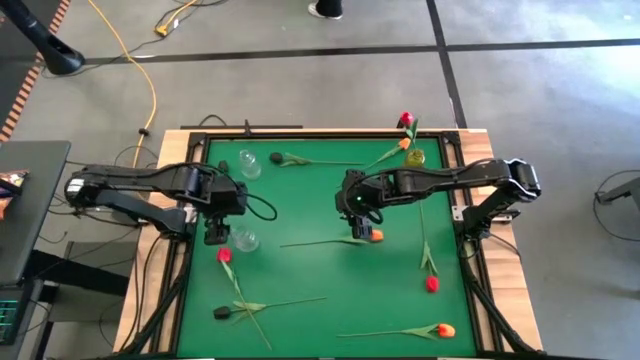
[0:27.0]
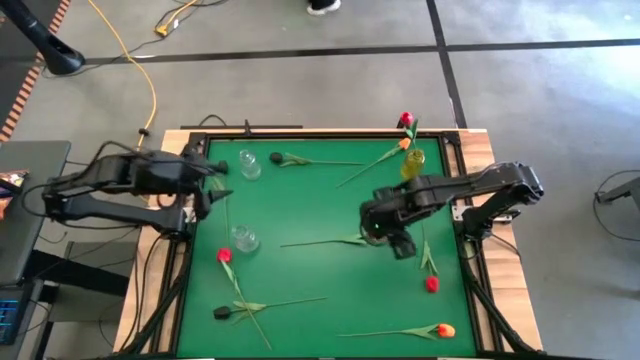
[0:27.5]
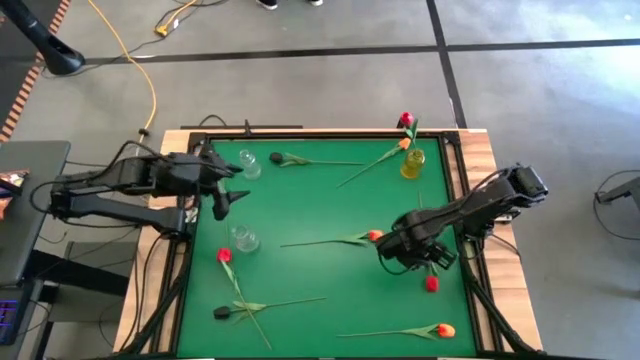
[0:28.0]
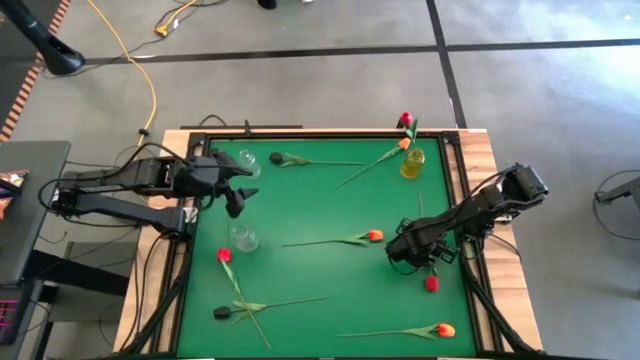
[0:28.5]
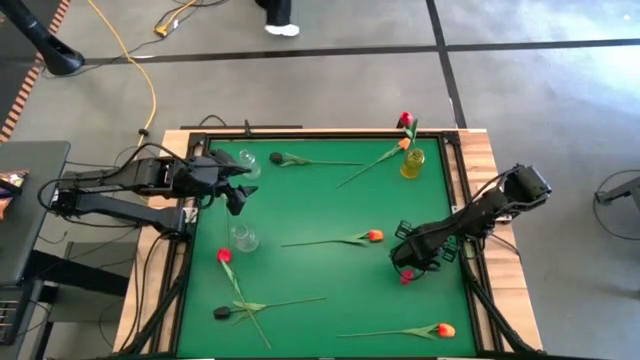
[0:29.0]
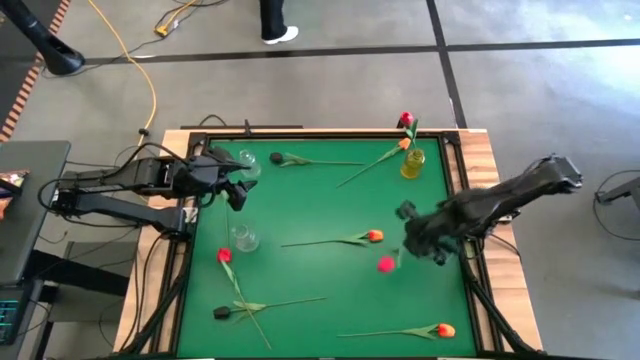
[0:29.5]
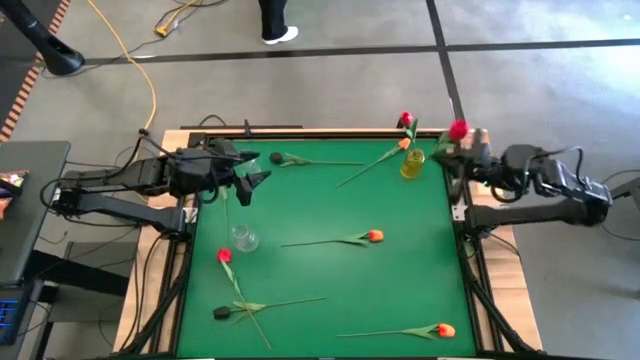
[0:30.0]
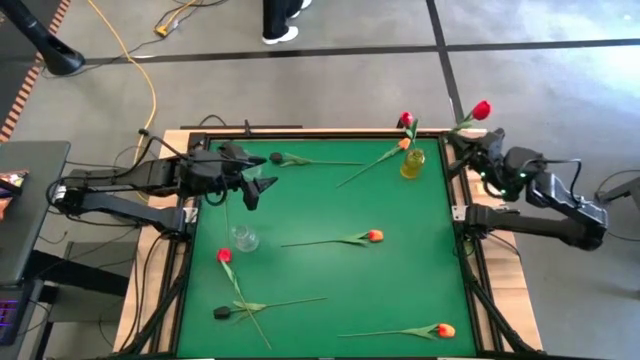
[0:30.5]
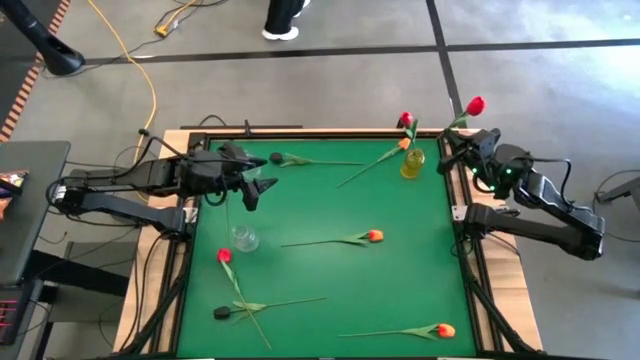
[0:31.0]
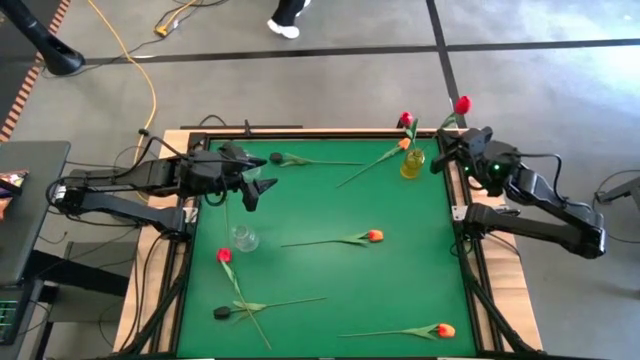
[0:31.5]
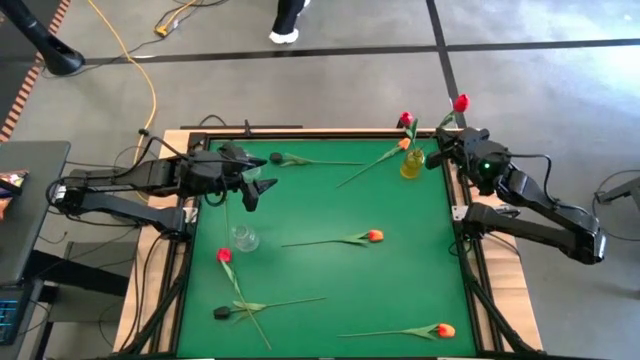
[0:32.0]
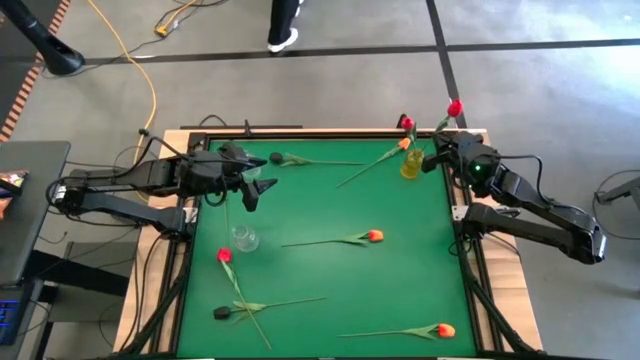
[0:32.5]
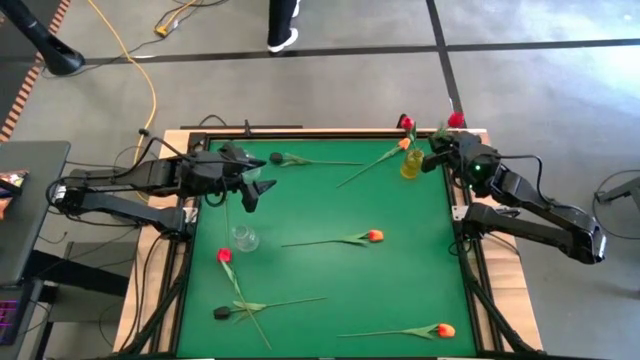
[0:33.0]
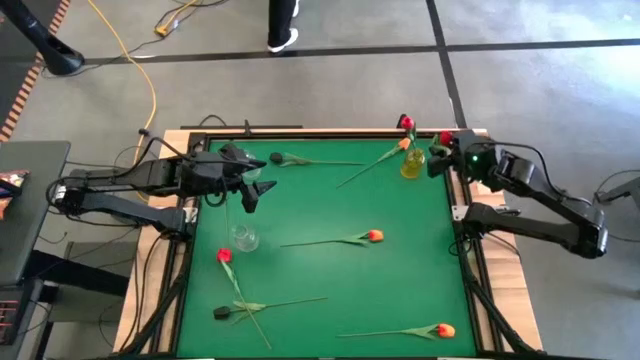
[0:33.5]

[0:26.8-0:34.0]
Task: Sort flowers into vase by color
Put the right red flower into the yellow vase

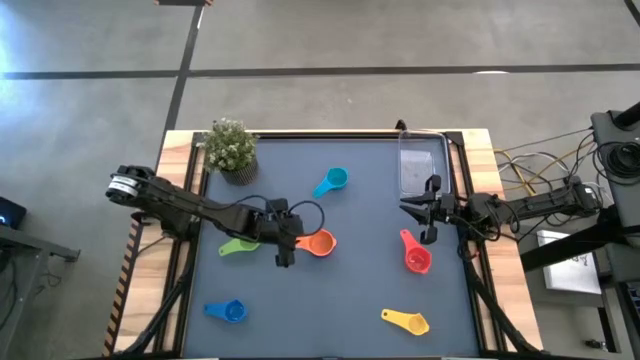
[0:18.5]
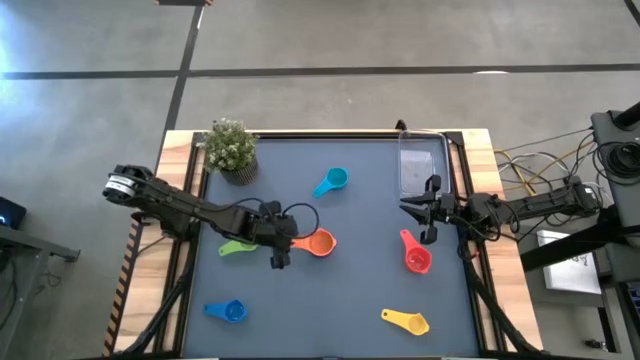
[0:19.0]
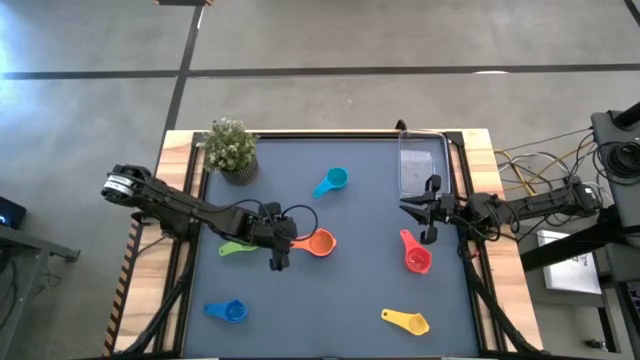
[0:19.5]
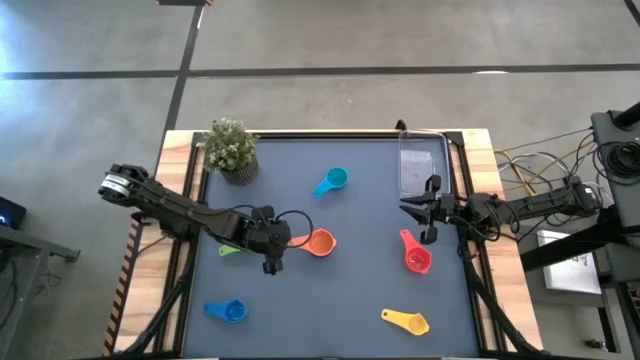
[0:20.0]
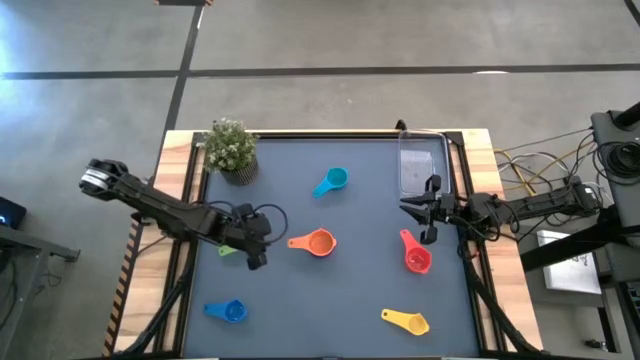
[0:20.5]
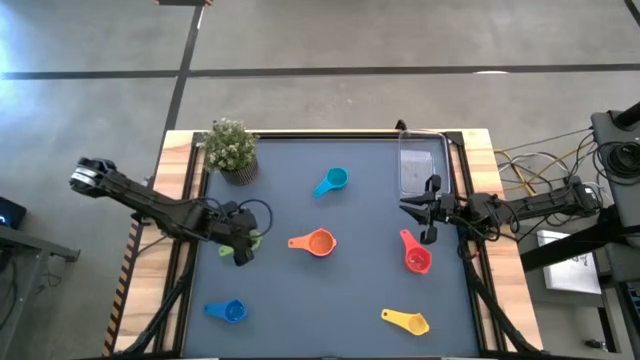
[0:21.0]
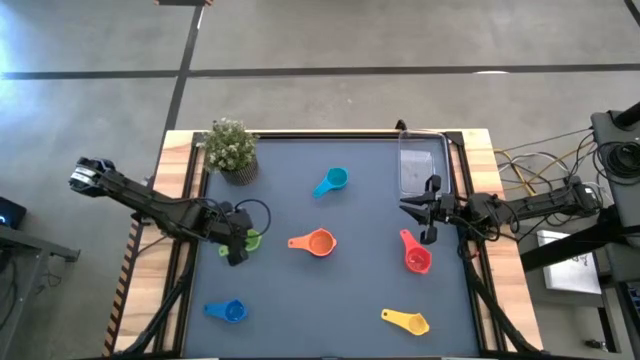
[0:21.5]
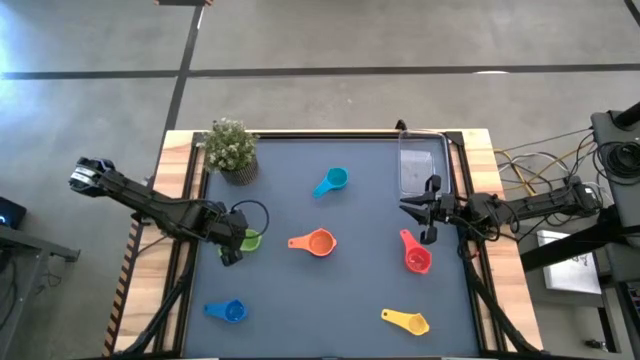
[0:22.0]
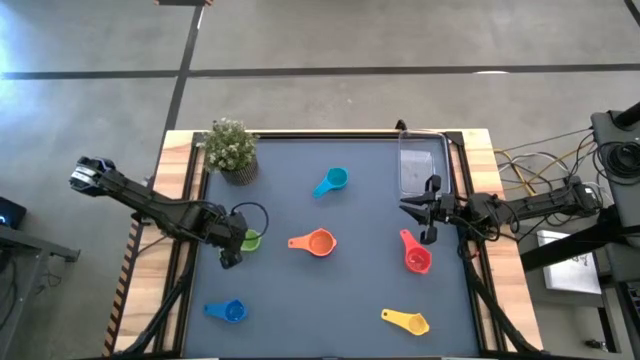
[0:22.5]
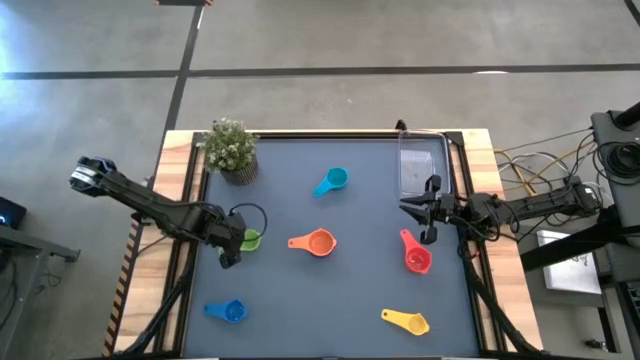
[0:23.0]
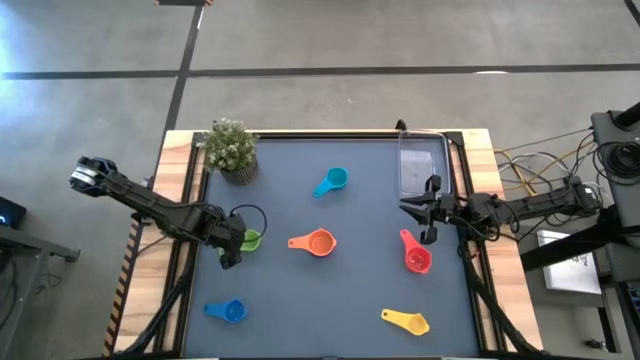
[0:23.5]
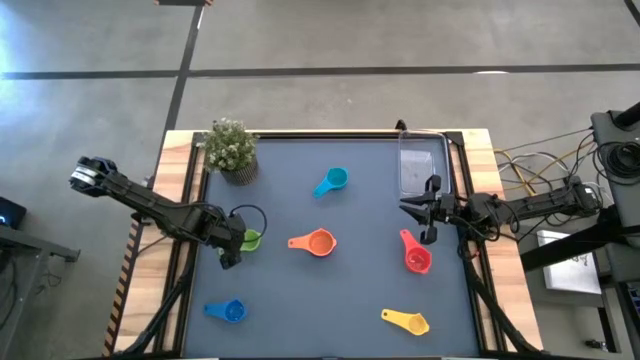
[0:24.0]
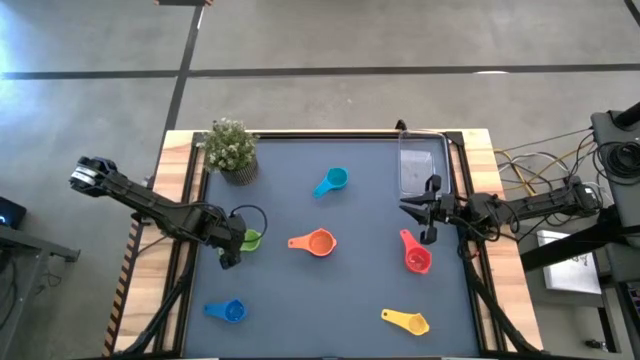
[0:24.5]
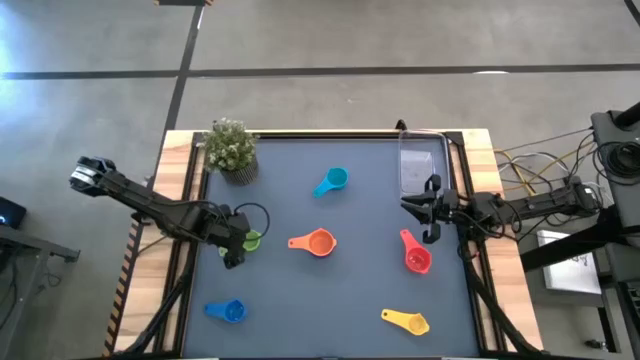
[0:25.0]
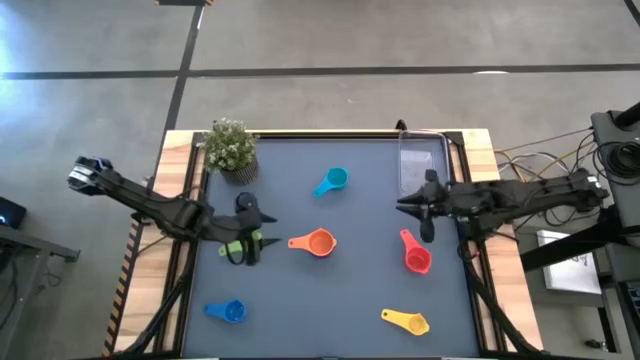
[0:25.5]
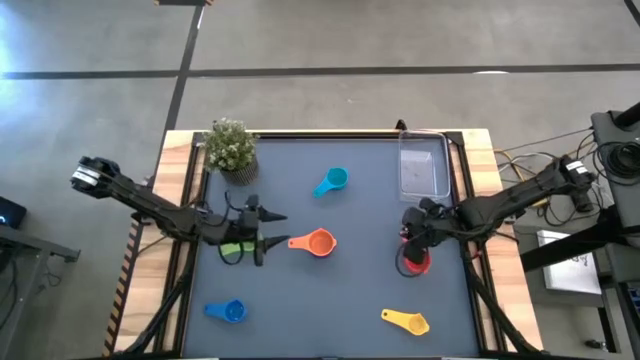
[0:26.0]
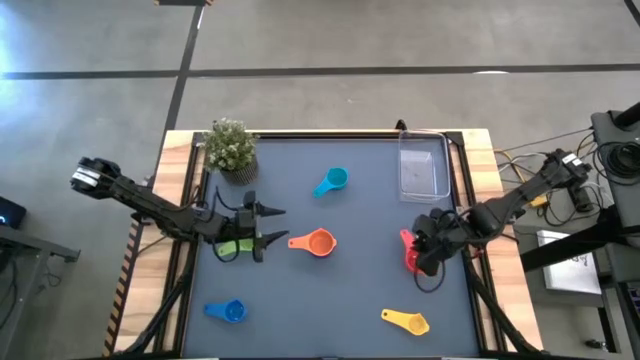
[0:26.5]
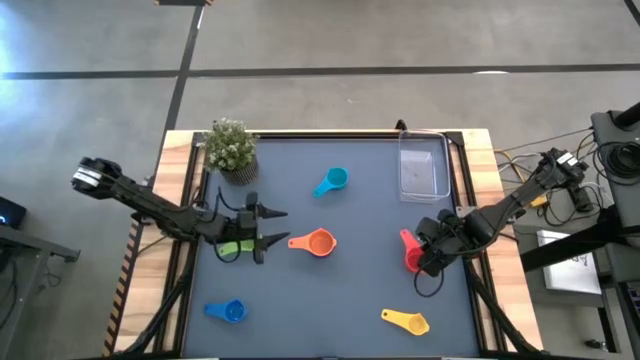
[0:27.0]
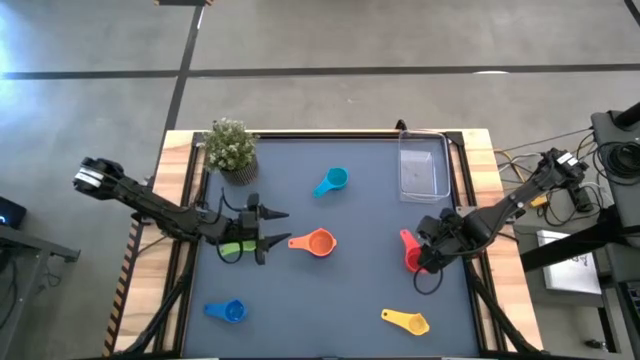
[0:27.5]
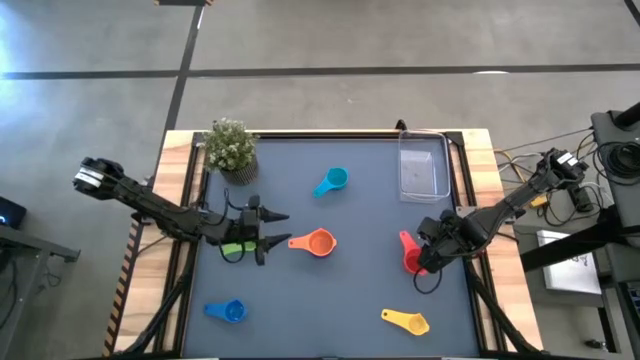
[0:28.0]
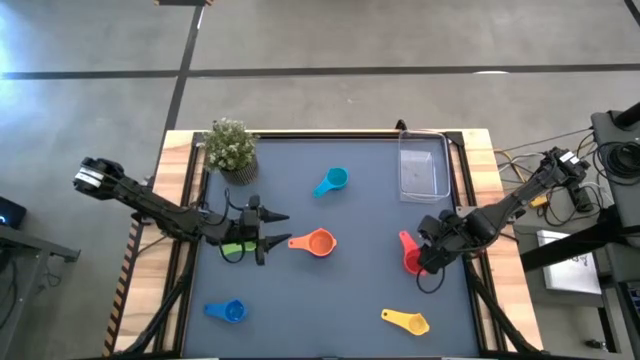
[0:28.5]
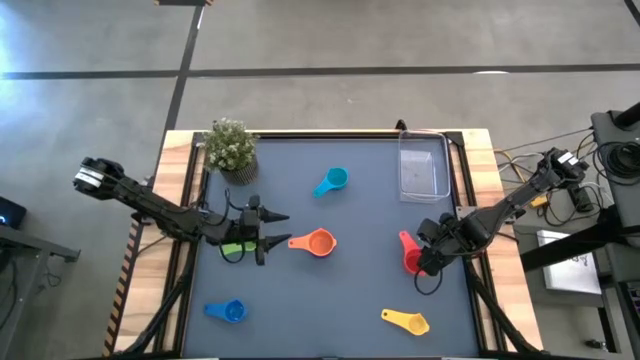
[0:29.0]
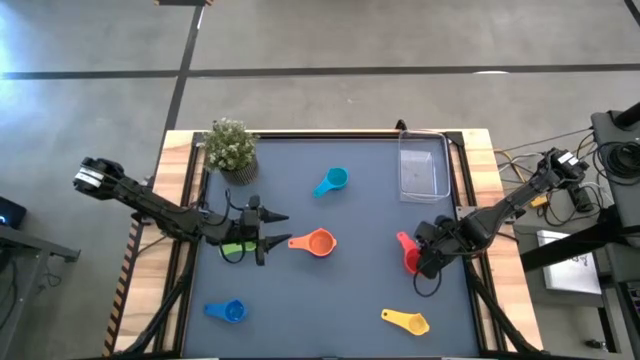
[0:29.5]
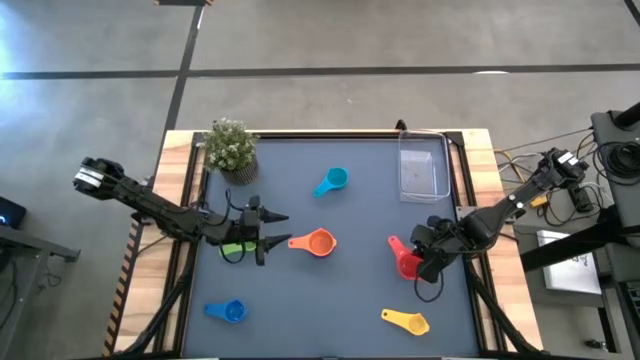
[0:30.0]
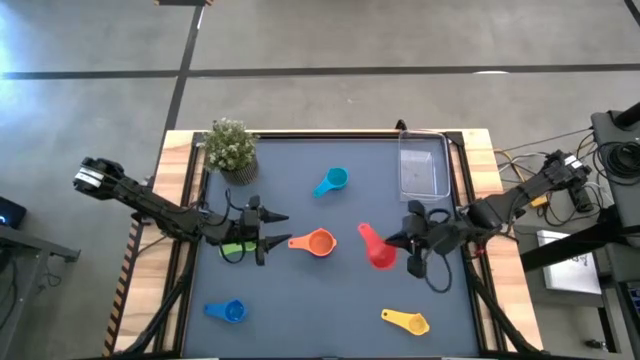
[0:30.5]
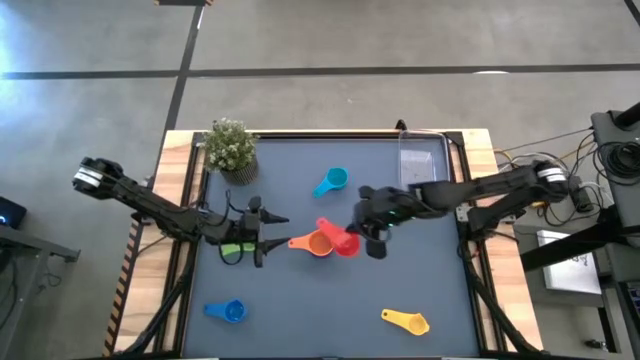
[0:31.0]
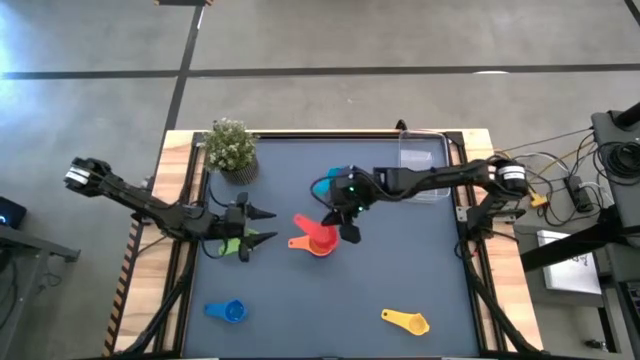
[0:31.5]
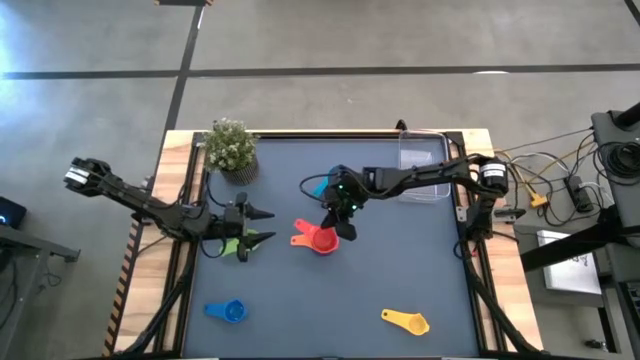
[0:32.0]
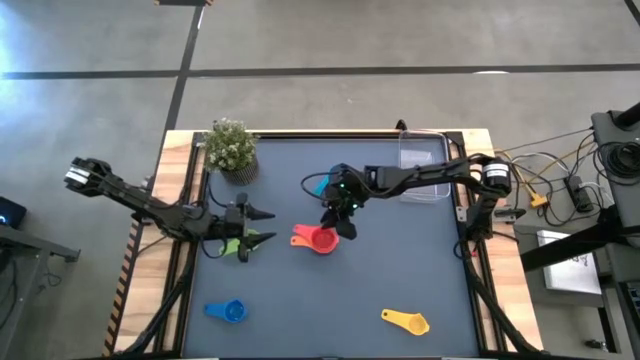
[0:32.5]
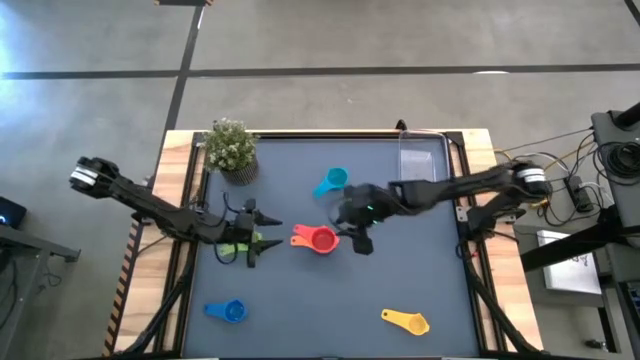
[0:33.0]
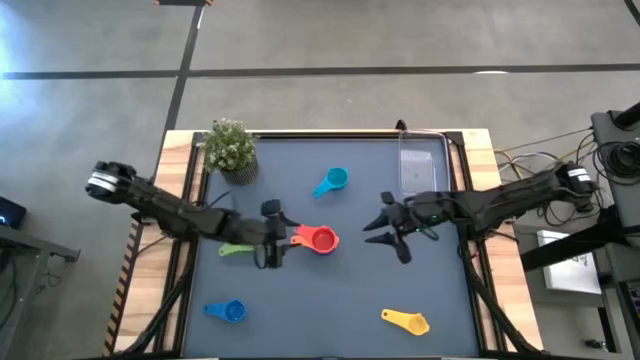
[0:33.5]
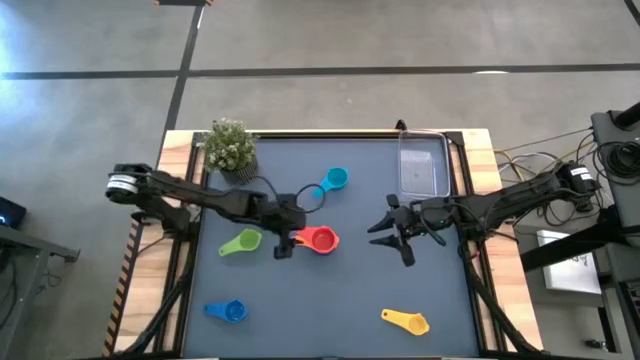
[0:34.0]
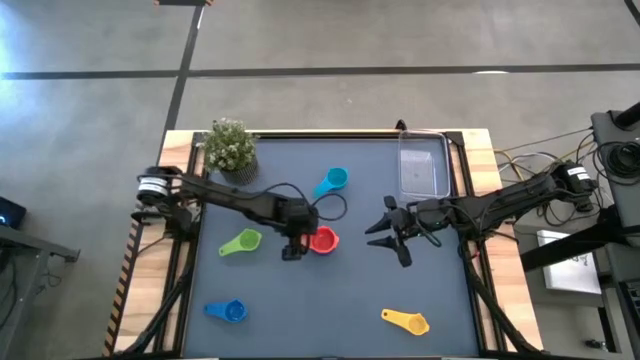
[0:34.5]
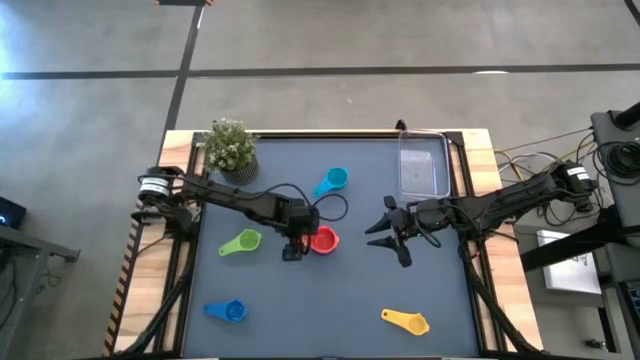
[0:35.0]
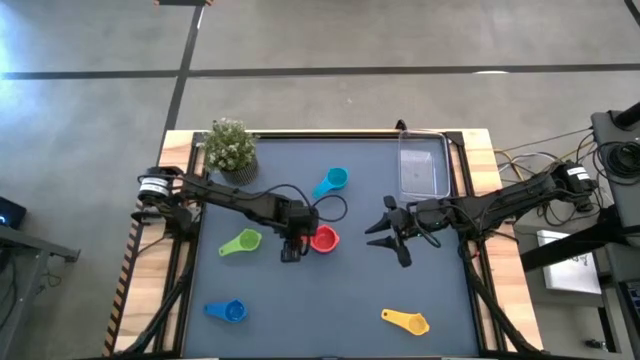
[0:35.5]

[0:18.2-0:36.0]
Task: Nest measuring cups in basket
Stack the red measuring cup on top of the orange measuring cup
